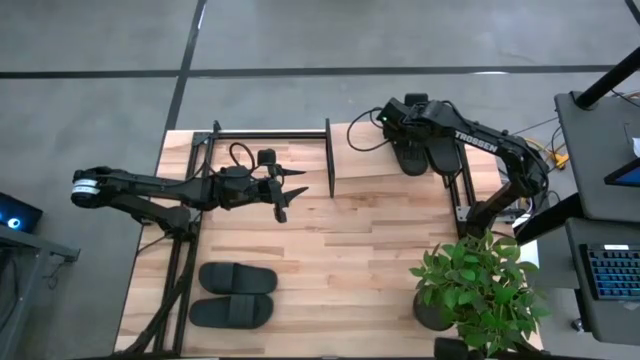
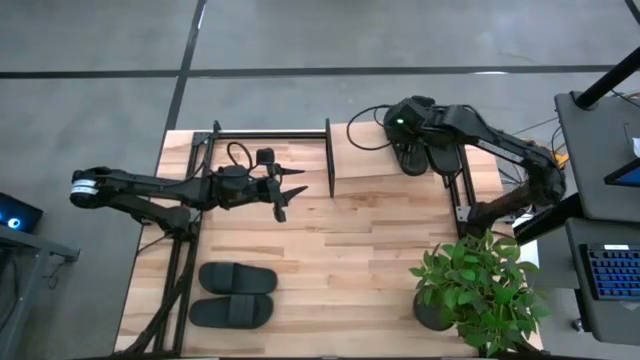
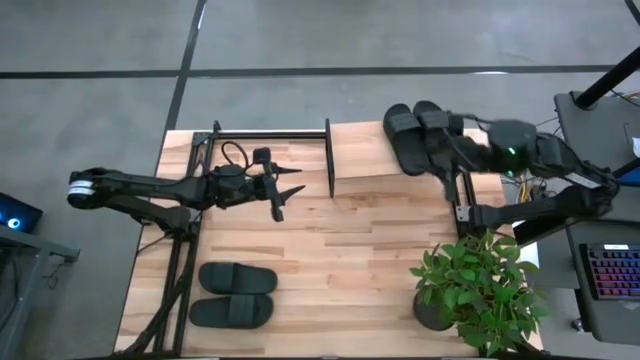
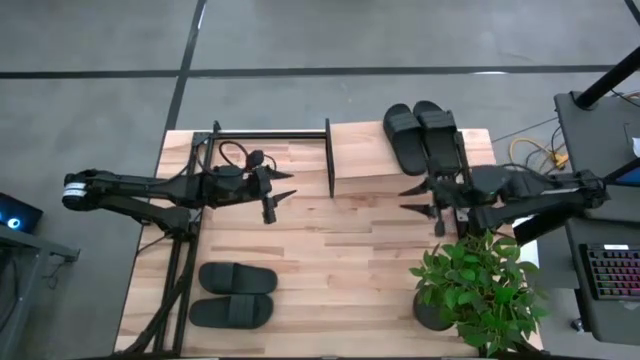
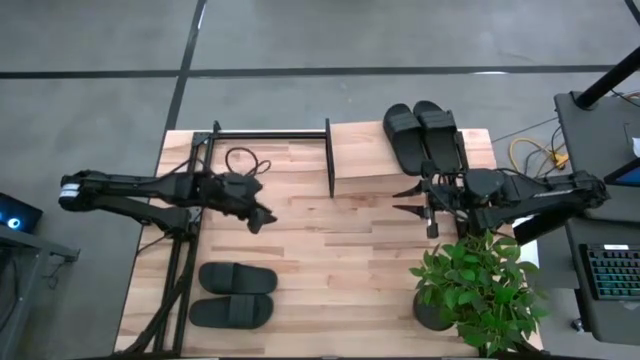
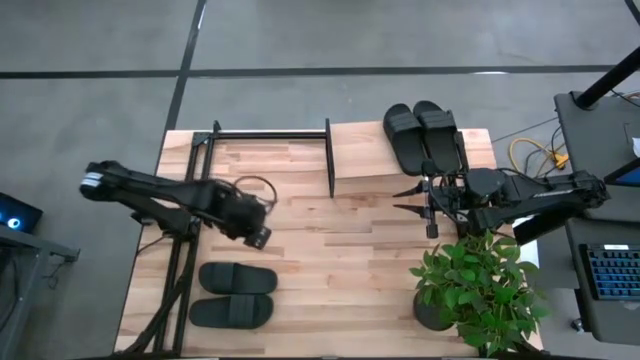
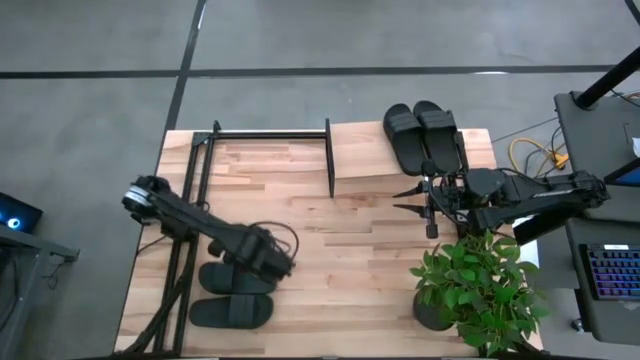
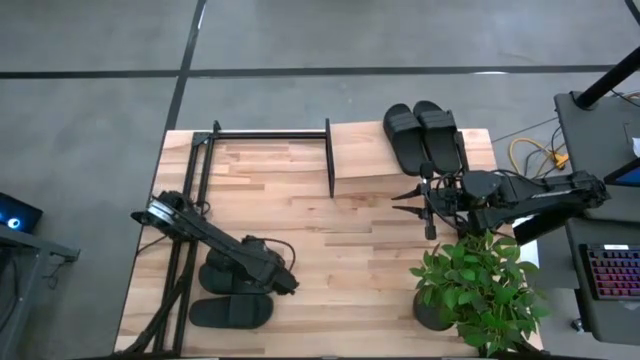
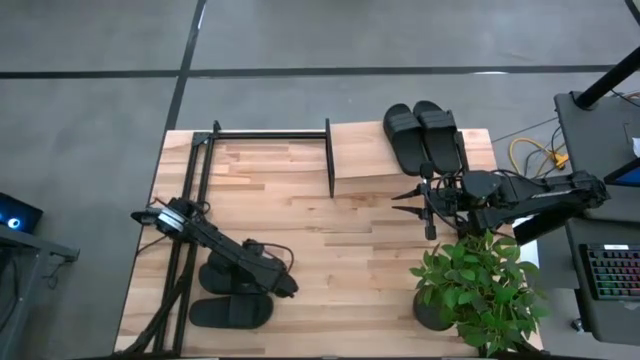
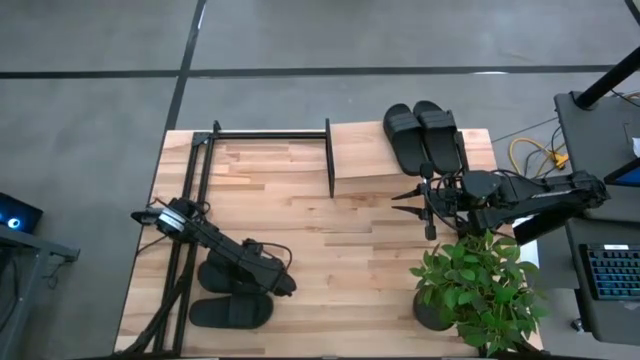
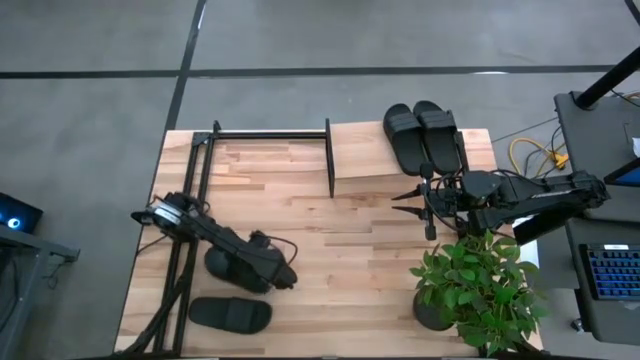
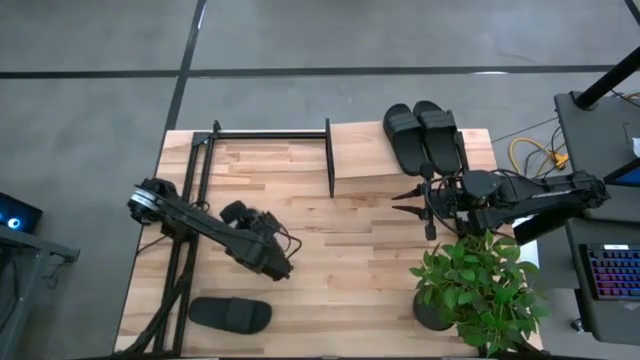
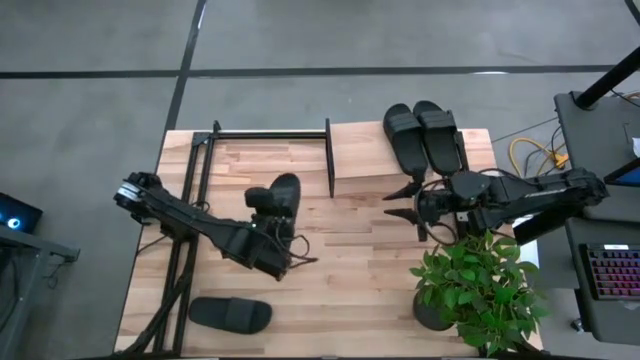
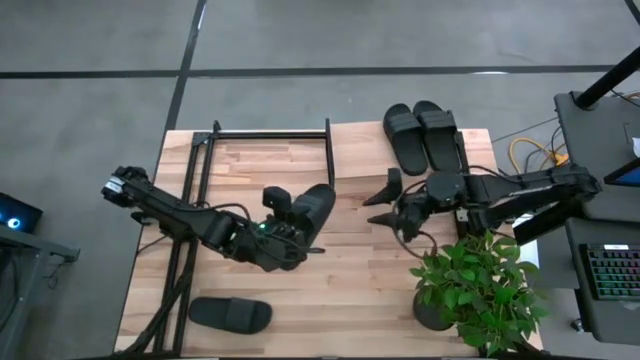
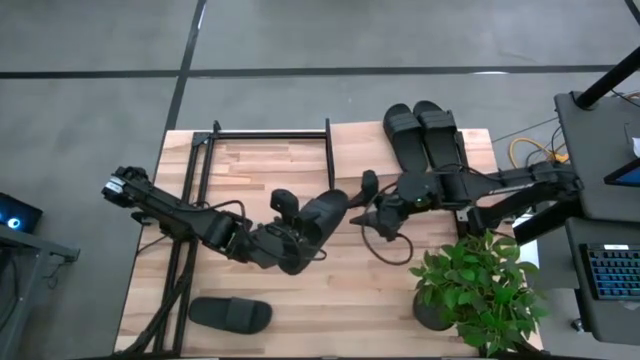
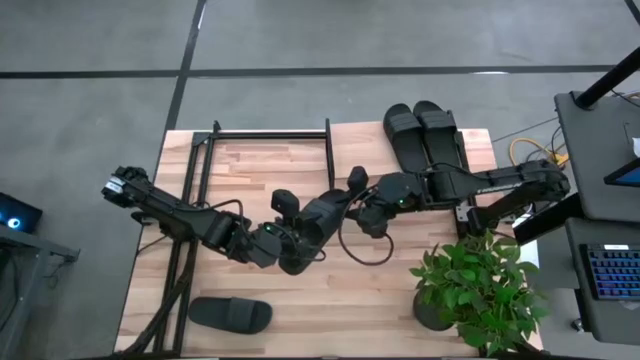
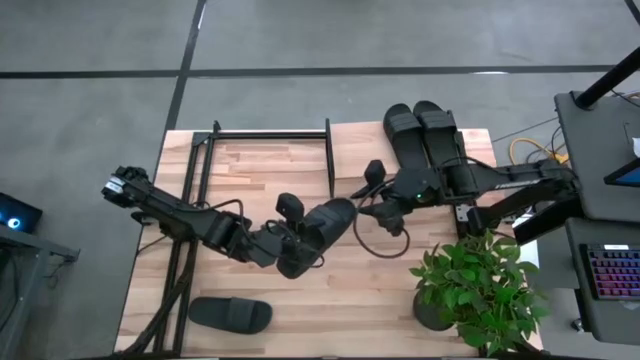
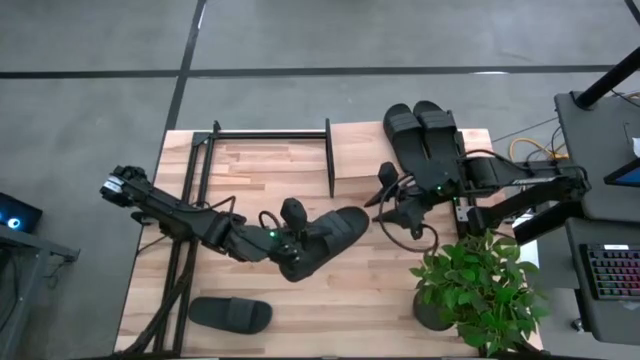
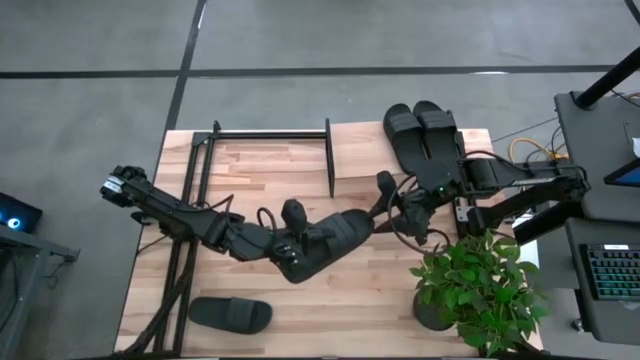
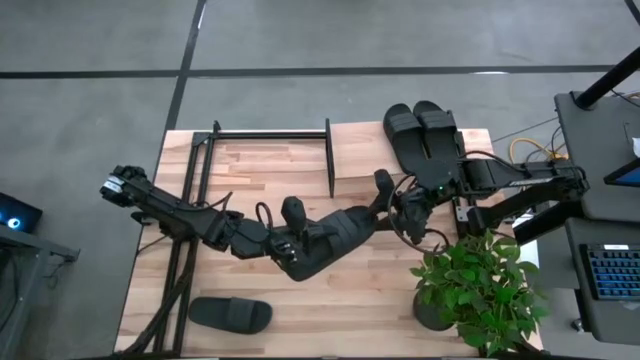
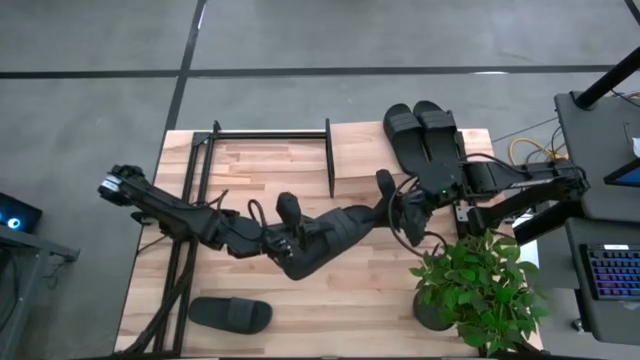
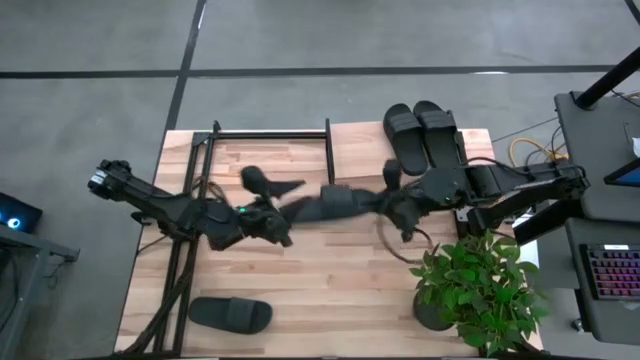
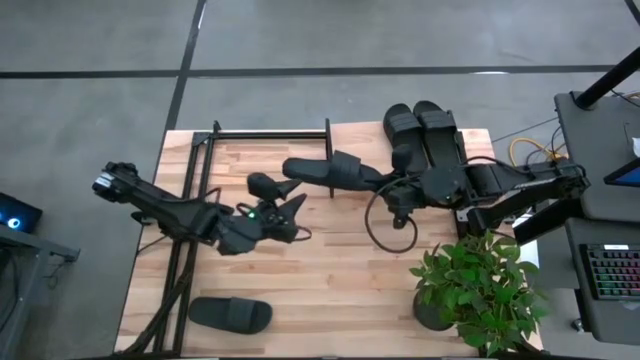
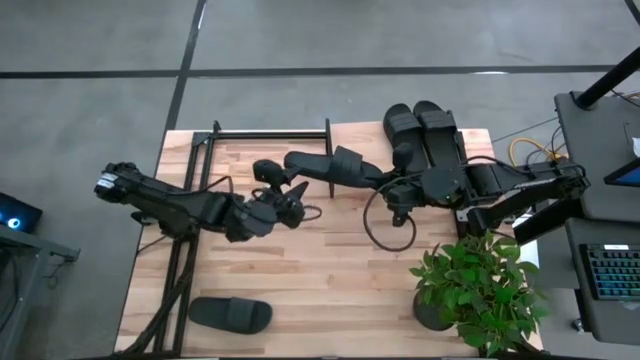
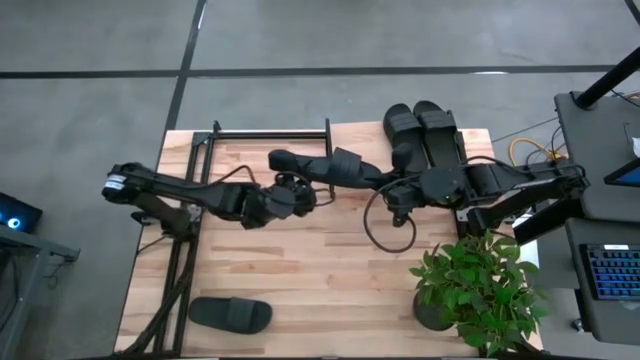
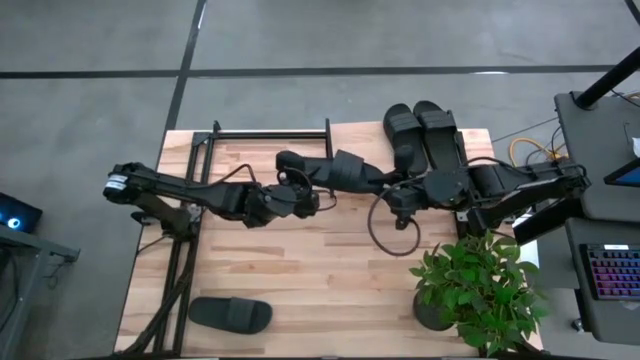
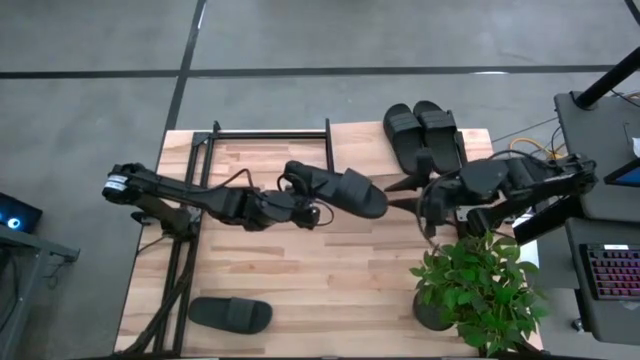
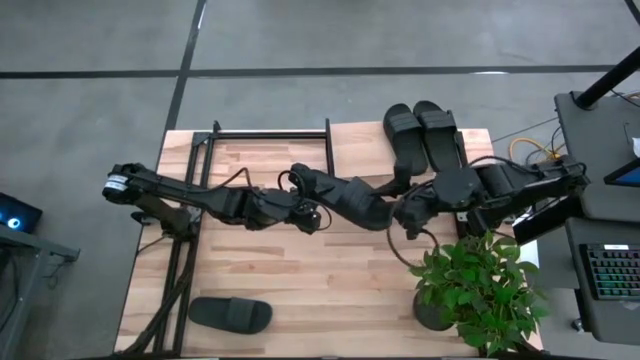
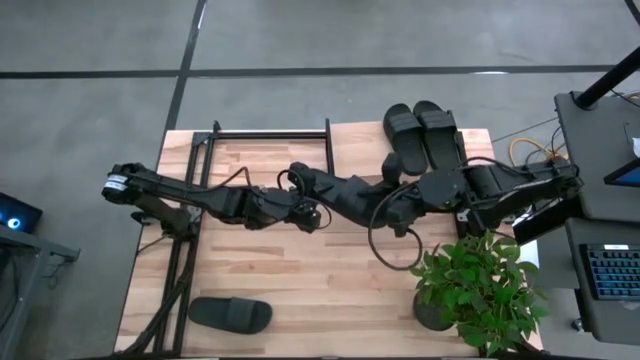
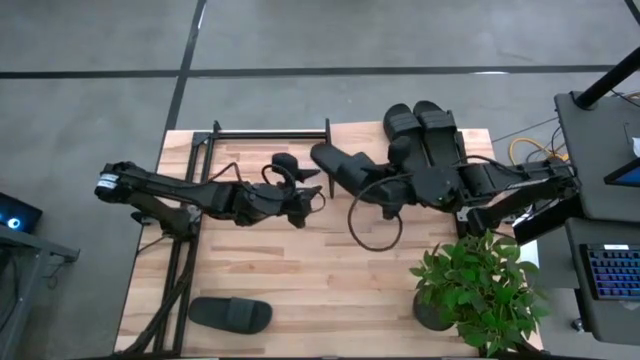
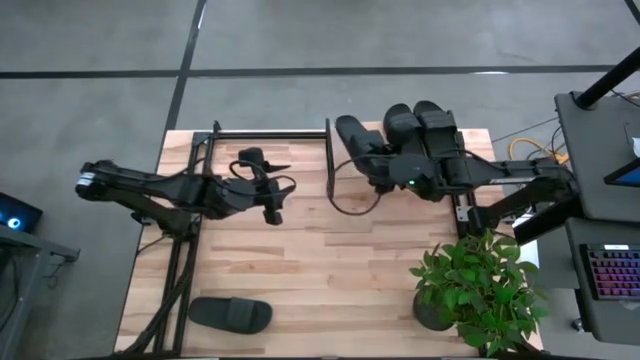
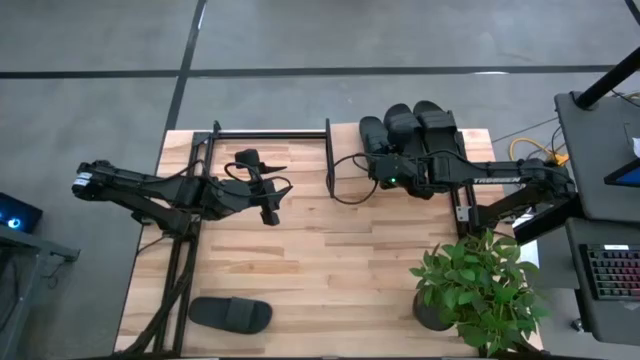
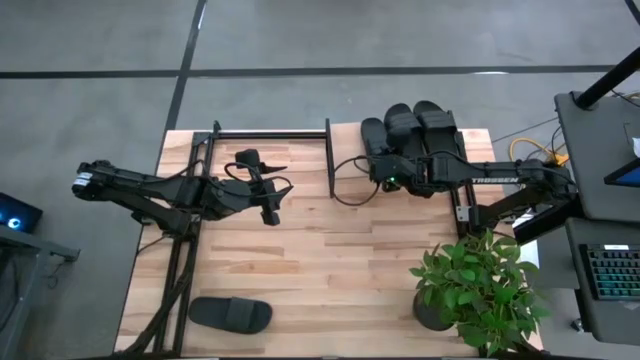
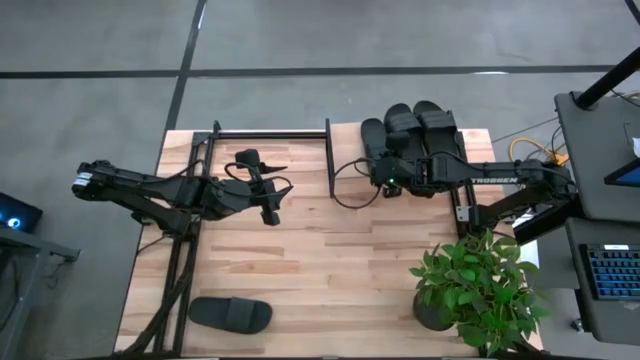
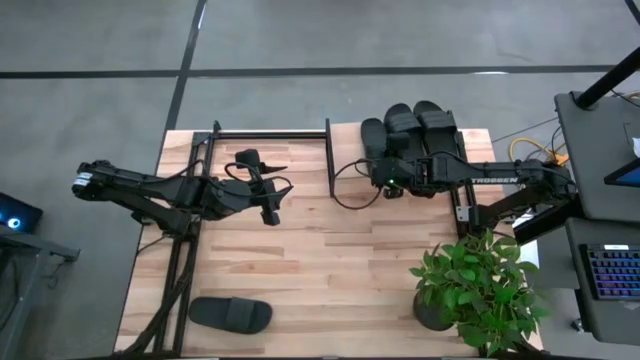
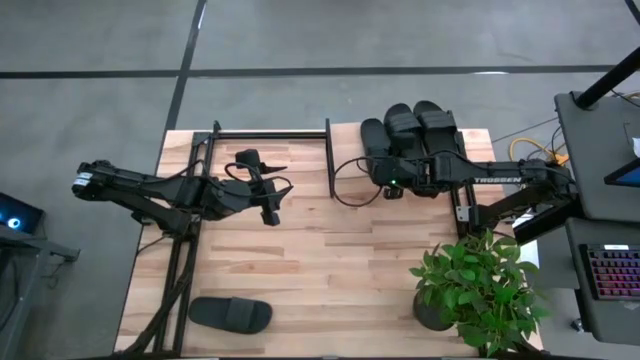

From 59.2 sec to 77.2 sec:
Task: Pick and place slides into the shelf
Put the black slipper on the shelf
